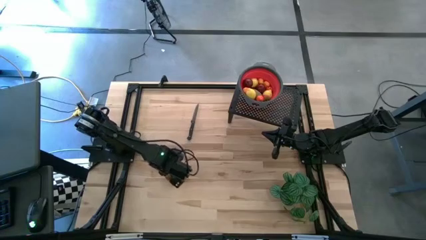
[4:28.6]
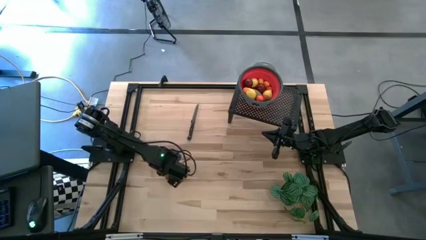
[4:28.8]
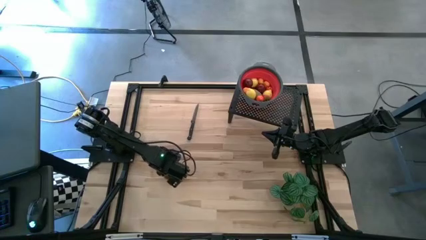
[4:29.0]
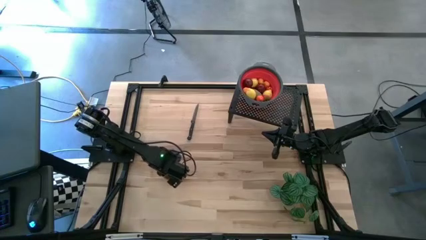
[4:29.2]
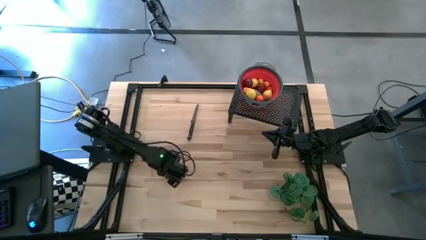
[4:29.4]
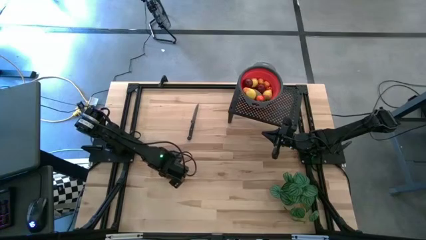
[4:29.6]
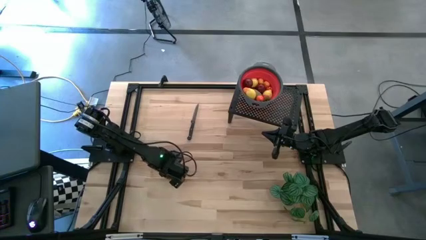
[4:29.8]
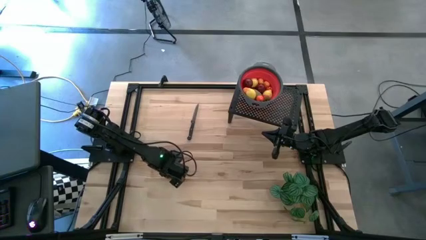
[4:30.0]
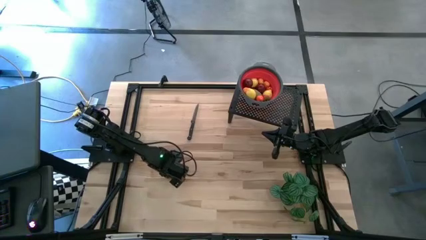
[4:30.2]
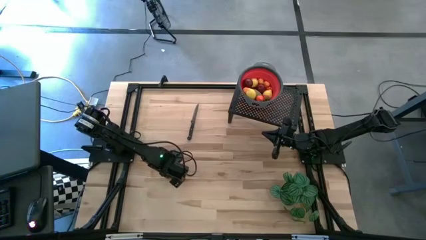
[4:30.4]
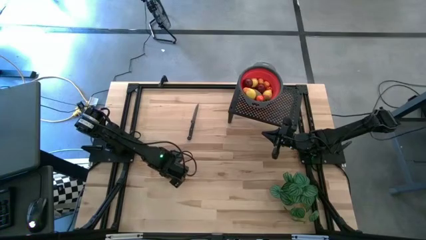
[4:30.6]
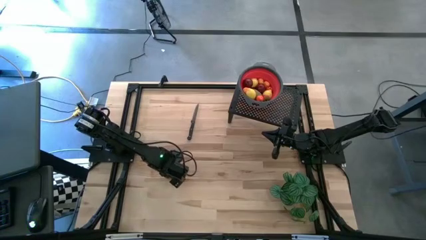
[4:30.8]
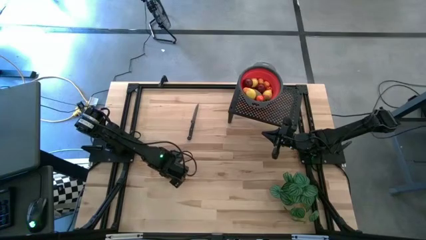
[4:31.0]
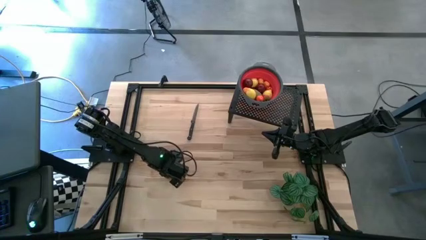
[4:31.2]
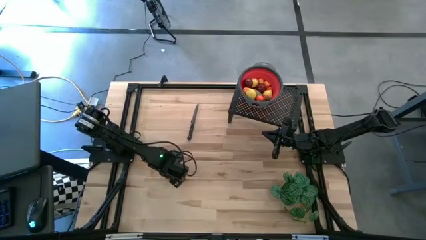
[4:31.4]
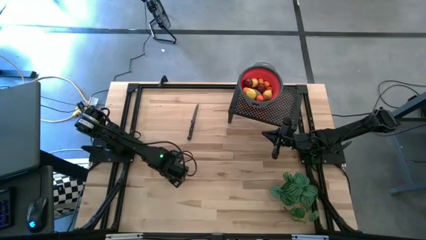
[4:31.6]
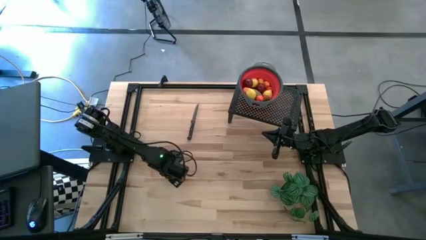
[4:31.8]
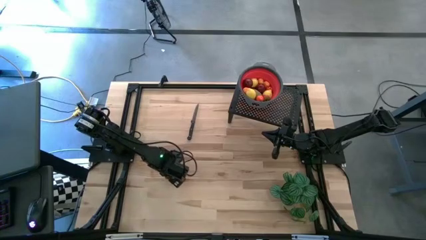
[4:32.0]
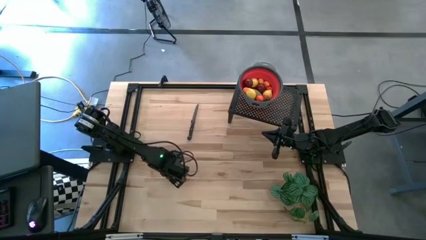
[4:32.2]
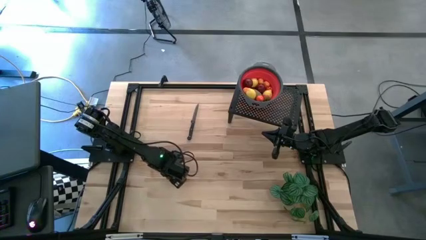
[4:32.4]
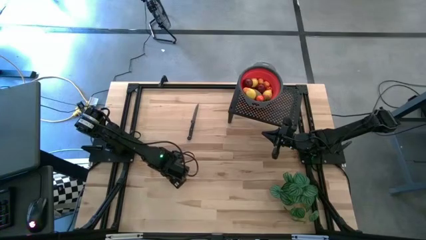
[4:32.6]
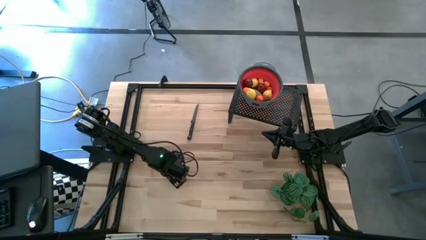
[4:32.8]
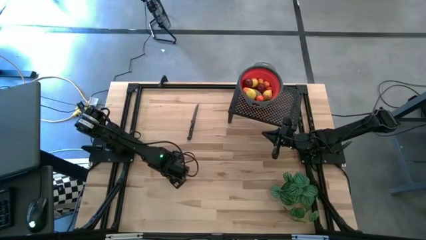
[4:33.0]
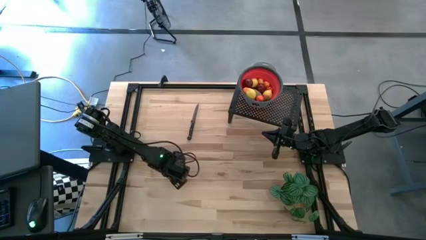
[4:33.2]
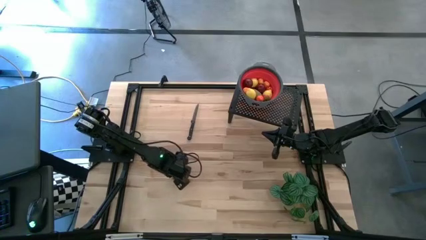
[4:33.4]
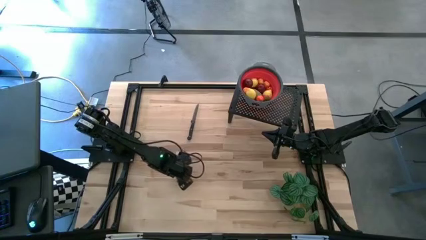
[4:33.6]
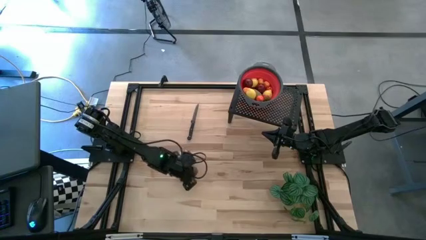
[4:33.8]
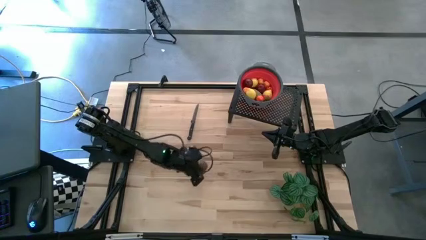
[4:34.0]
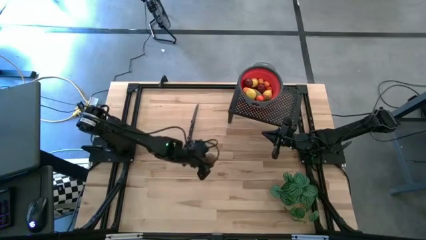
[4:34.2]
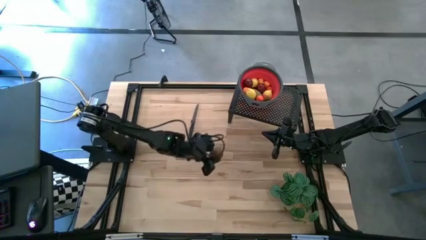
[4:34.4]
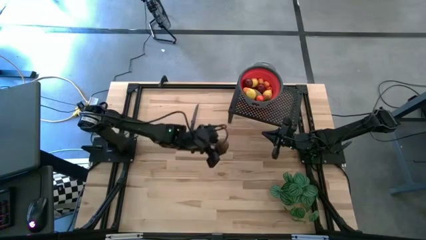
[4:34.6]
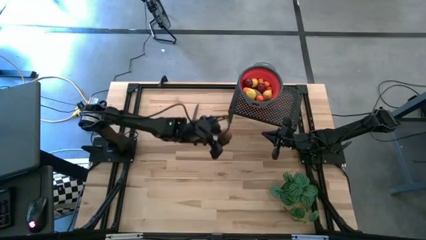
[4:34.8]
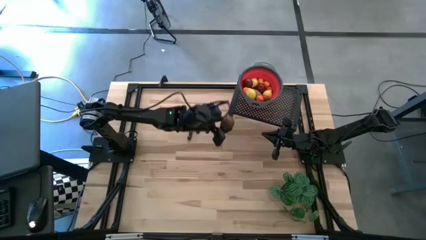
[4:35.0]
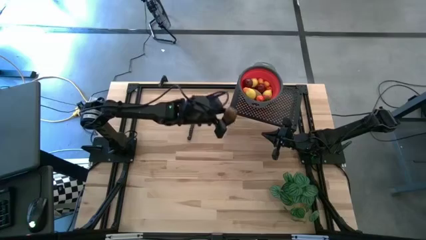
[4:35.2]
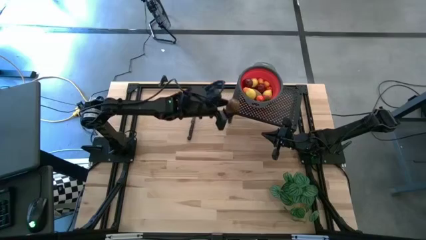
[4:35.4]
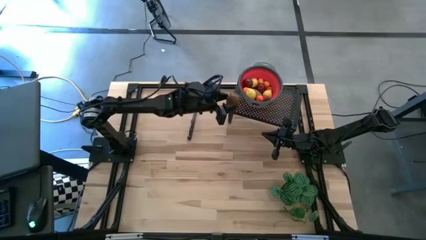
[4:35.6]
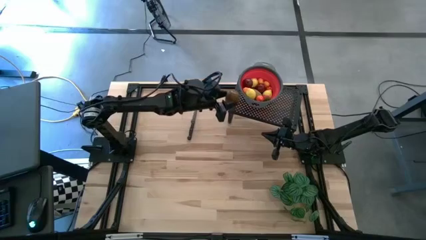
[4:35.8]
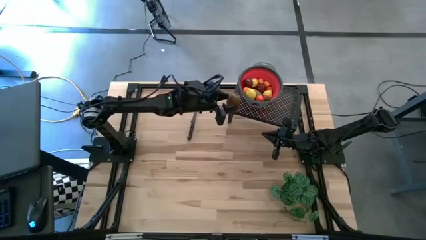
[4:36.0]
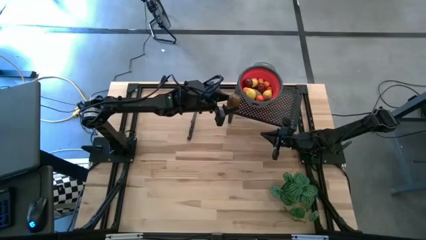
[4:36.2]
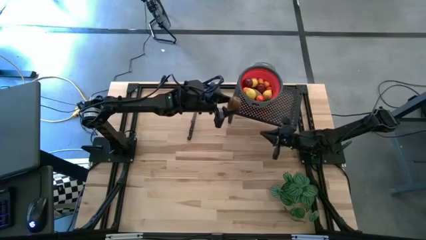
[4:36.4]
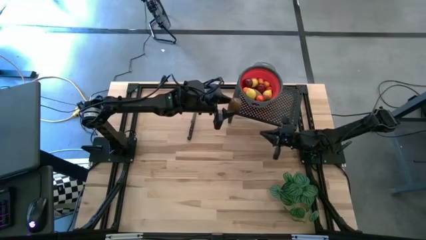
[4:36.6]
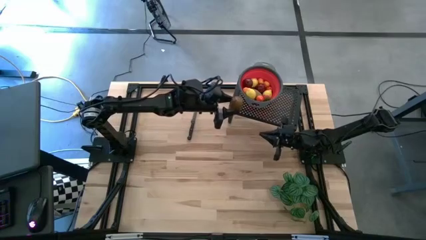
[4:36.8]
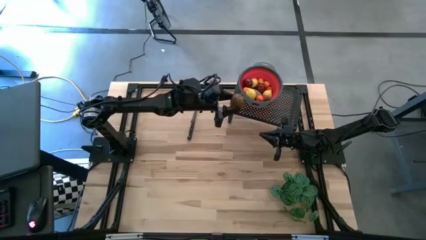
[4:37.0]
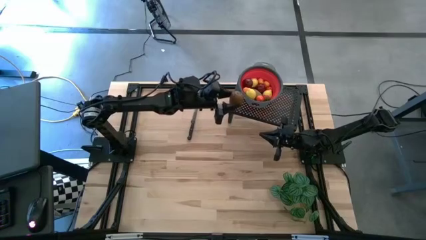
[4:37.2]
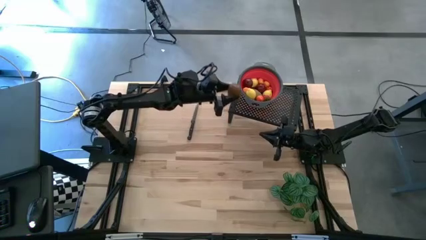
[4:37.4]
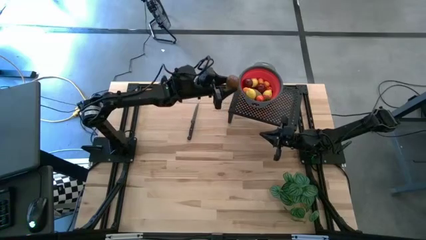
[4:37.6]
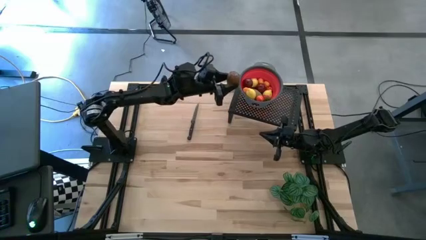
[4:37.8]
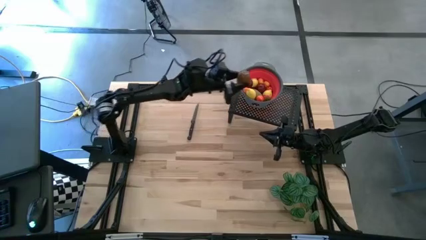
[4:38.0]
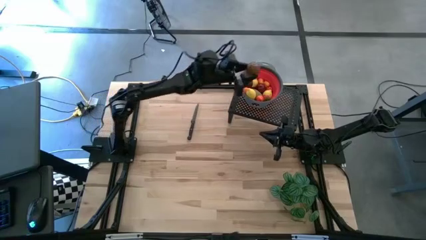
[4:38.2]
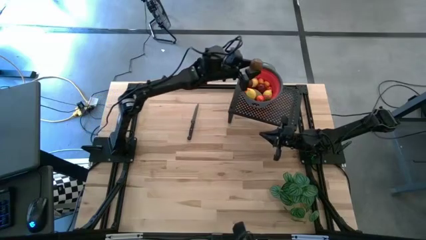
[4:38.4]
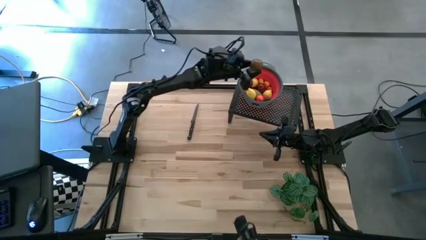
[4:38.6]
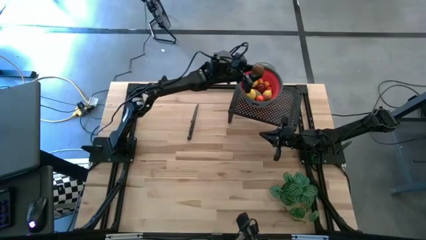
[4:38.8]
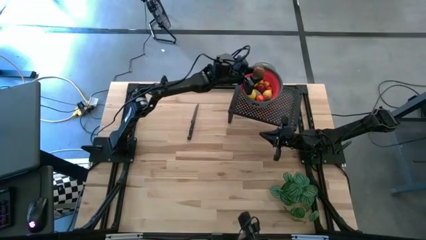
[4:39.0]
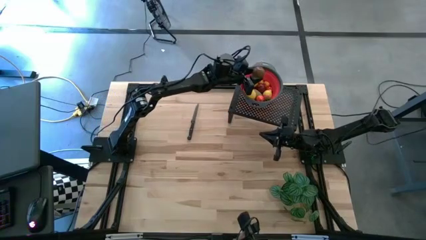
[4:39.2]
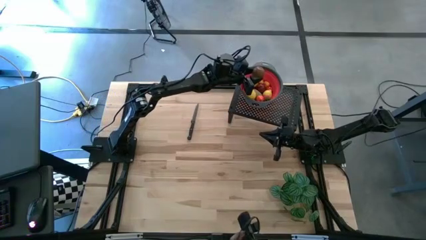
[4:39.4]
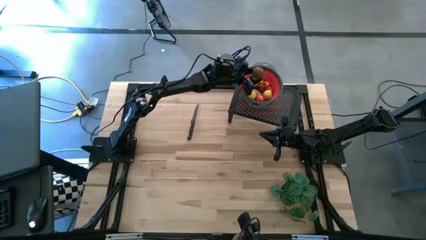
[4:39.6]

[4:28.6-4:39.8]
Task: Pick & Place Fruit
Put the brown kiwi into the red strainer bowl on the shelf

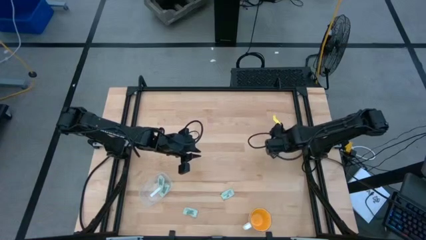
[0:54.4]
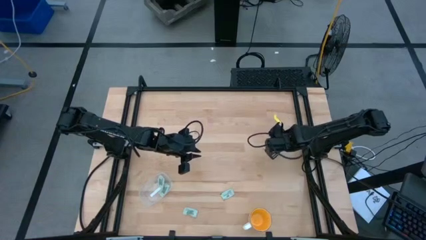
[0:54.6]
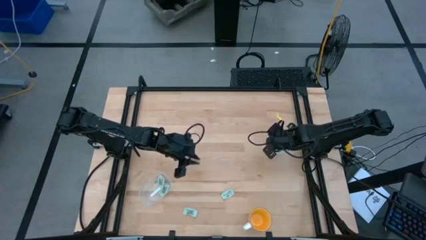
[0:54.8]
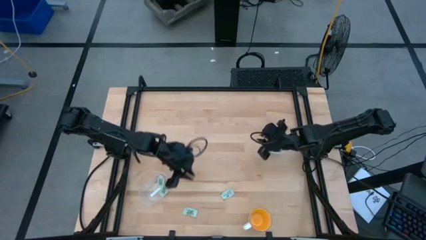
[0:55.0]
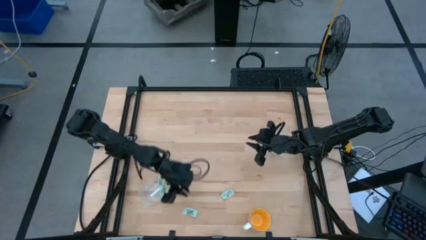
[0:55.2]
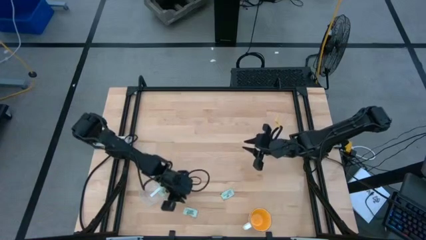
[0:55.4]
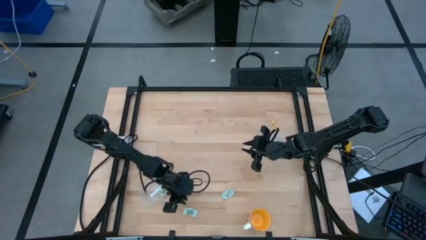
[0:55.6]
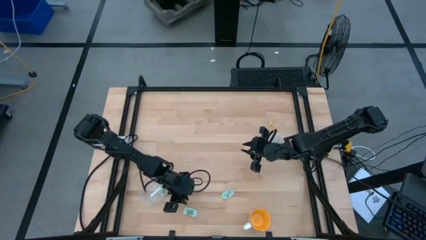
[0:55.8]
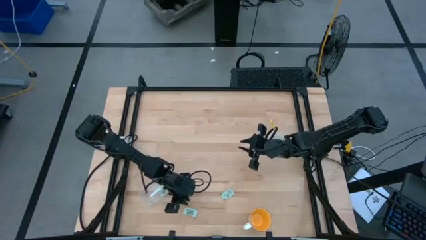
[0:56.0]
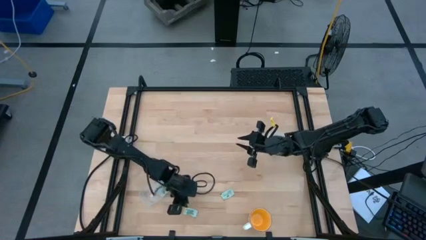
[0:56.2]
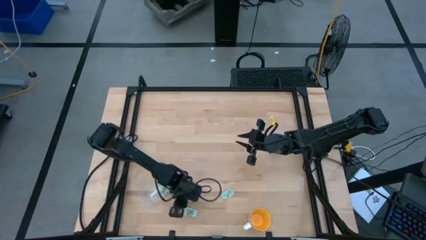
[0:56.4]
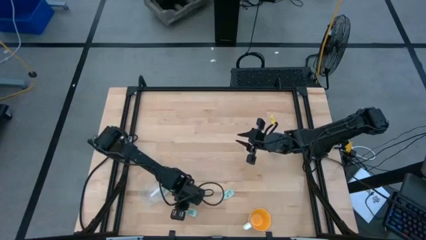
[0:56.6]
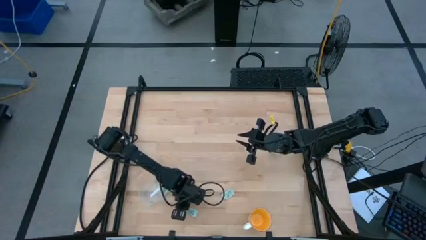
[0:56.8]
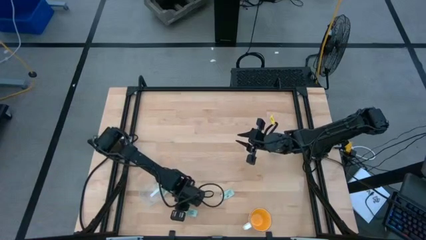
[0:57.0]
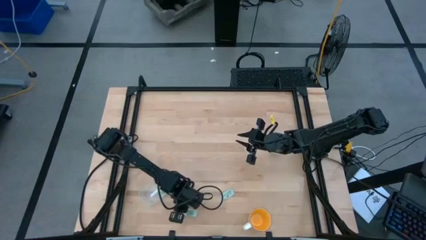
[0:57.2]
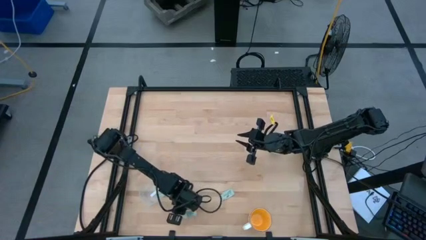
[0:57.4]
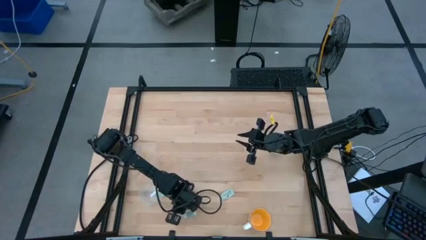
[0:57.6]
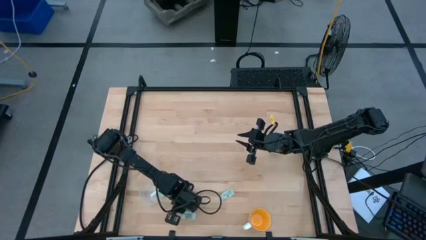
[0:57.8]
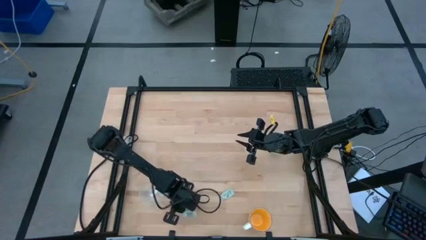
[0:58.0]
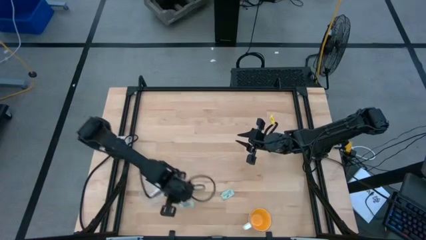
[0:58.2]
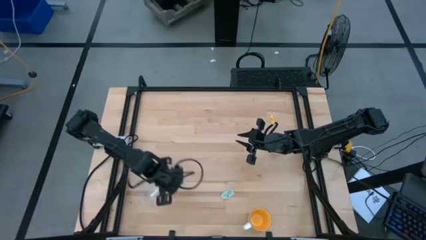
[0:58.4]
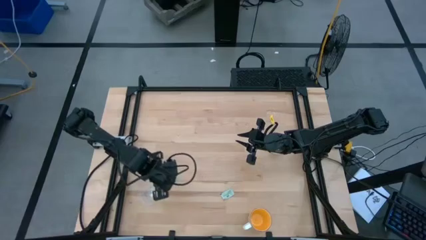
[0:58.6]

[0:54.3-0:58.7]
Task: Pick and place Stevia / Truvia into bins
Put the white stevia packet into the rectangle transparent container

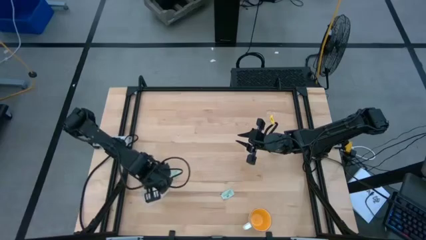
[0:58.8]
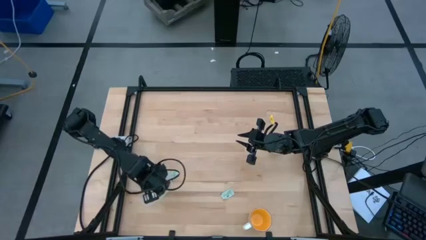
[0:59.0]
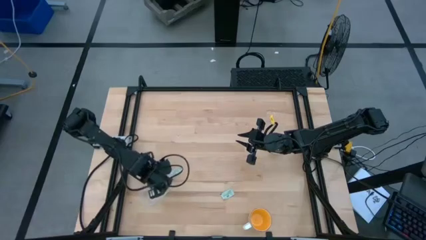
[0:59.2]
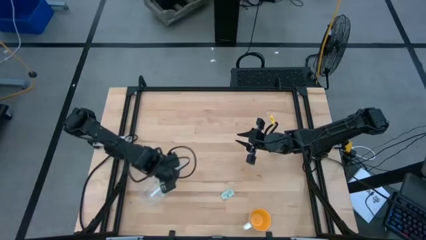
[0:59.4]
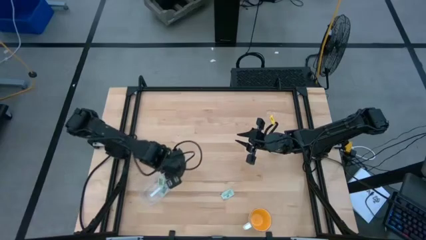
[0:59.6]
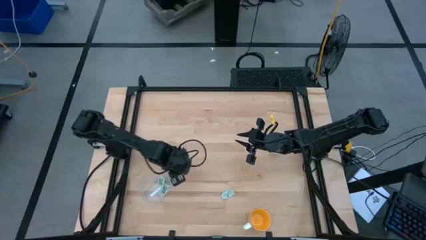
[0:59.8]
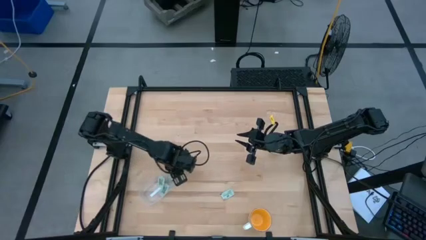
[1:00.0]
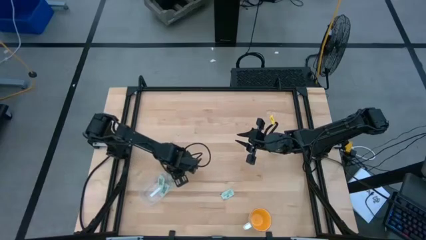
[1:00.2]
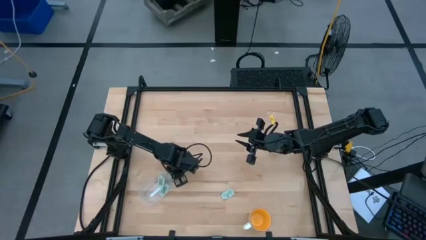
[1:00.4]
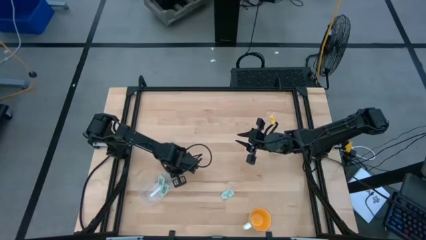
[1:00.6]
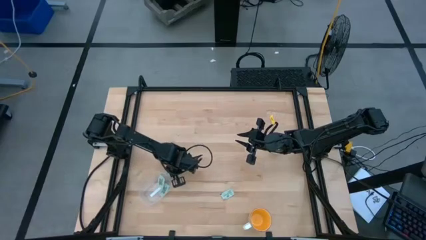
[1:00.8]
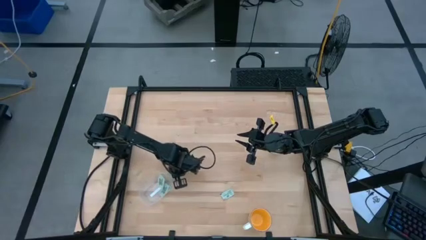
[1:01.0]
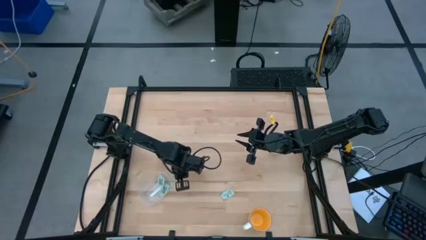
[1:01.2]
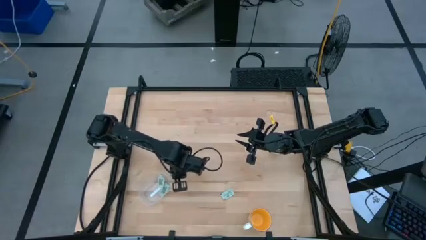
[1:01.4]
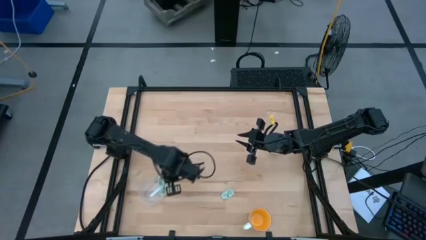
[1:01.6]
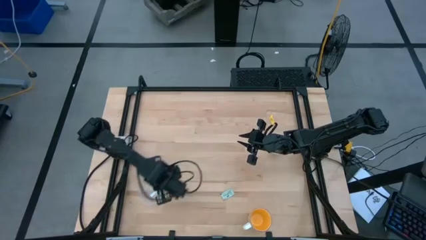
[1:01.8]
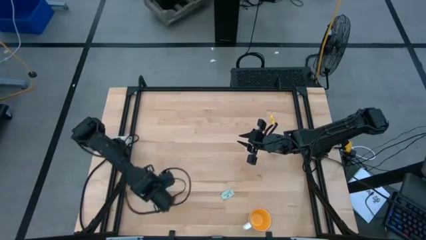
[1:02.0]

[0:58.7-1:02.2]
Put the white stevia packet into the rectangle transparent container
